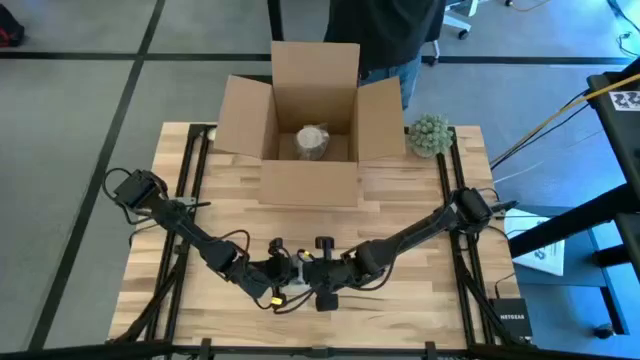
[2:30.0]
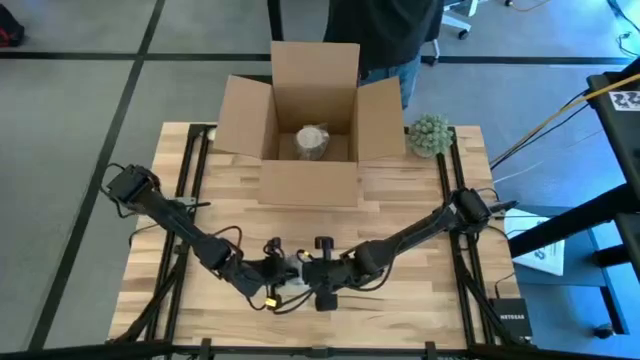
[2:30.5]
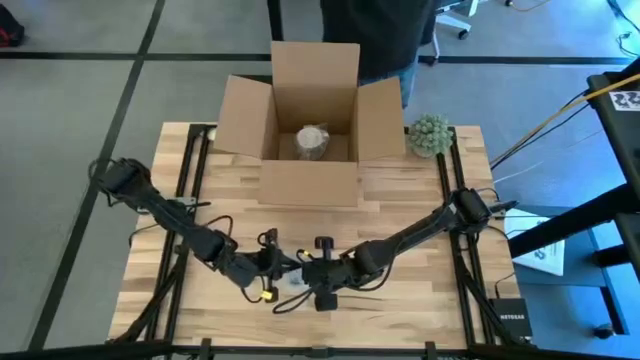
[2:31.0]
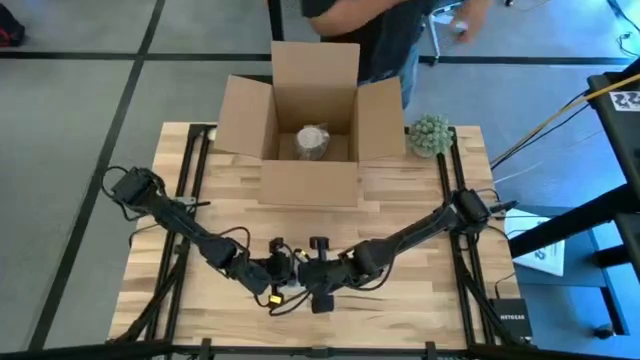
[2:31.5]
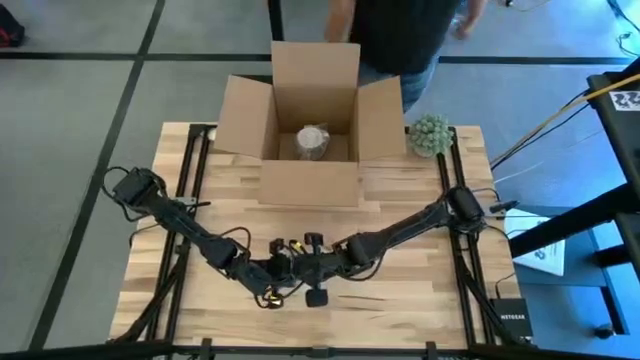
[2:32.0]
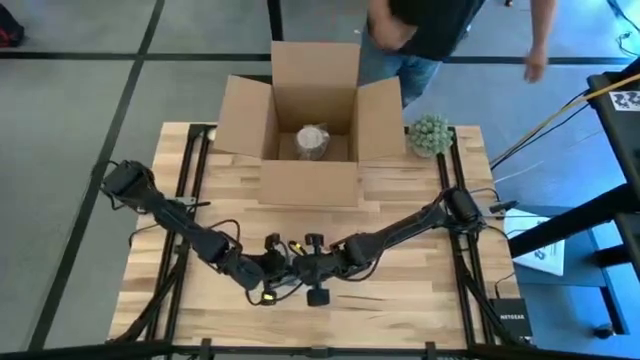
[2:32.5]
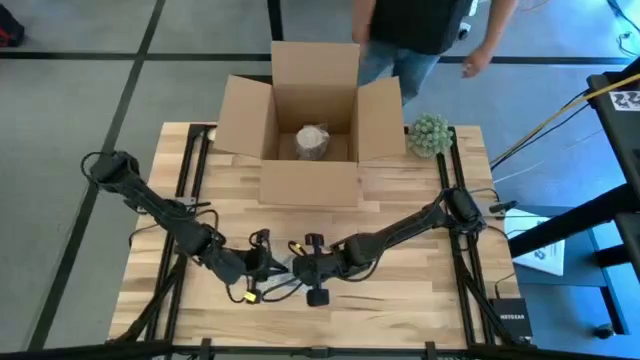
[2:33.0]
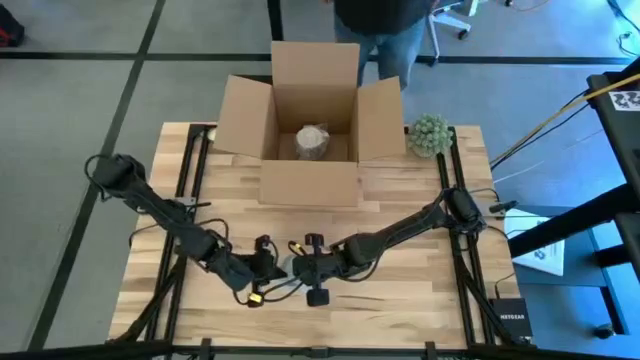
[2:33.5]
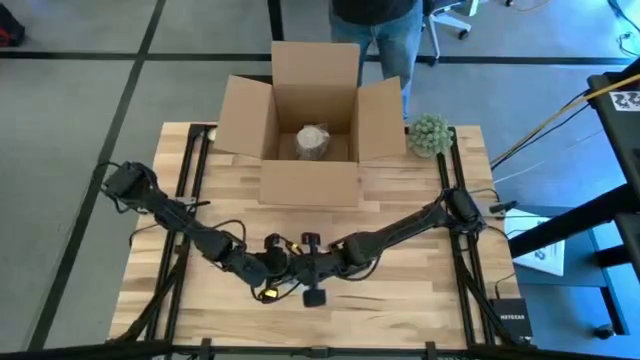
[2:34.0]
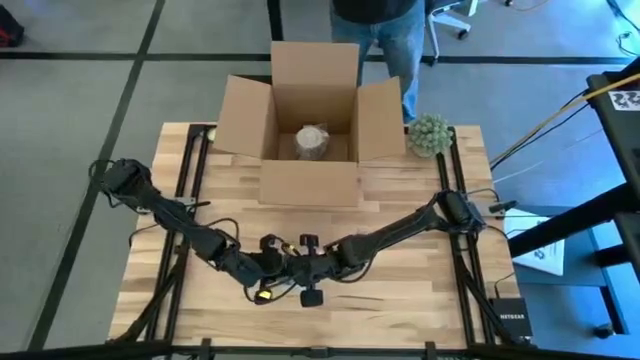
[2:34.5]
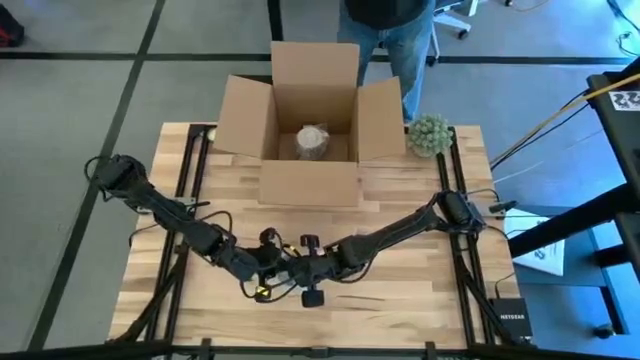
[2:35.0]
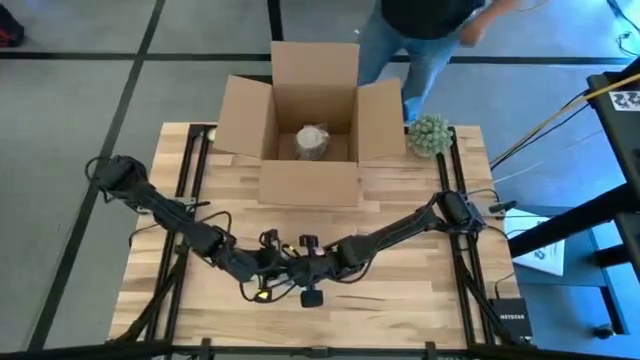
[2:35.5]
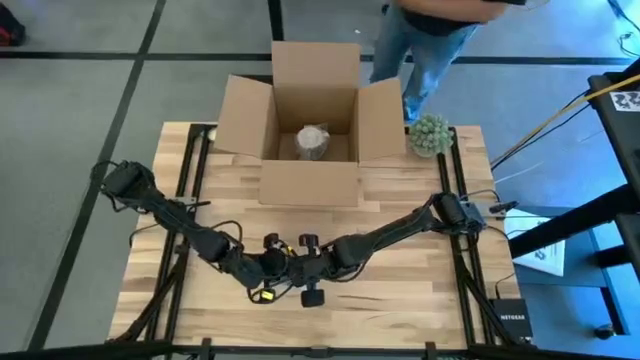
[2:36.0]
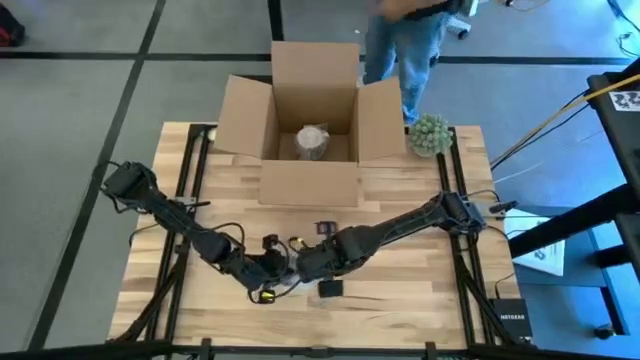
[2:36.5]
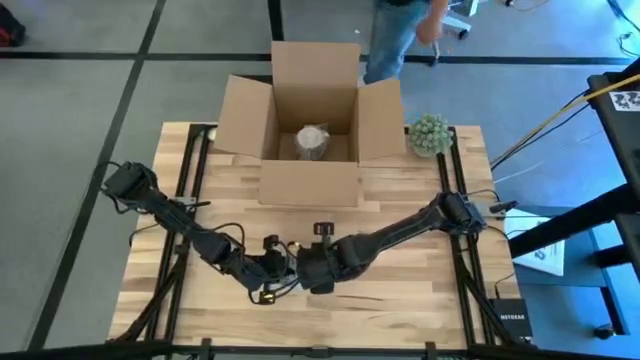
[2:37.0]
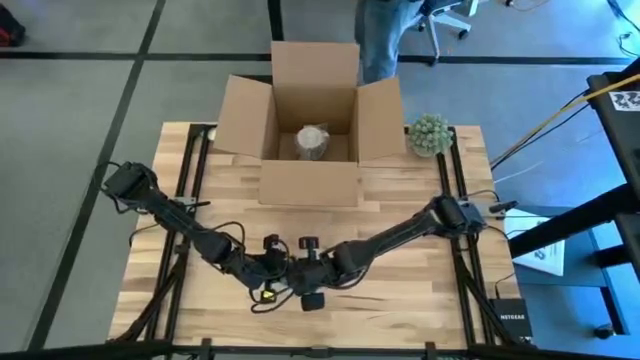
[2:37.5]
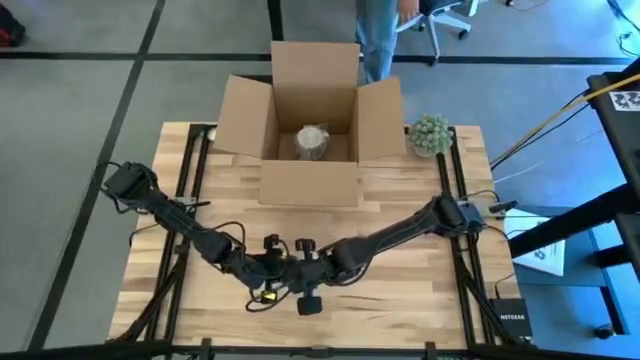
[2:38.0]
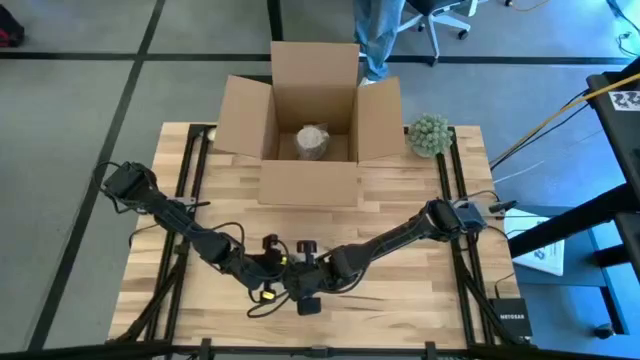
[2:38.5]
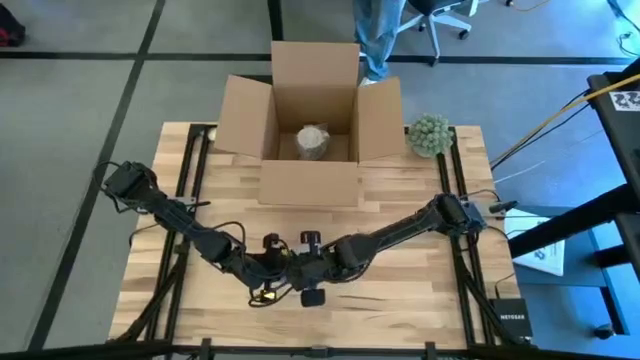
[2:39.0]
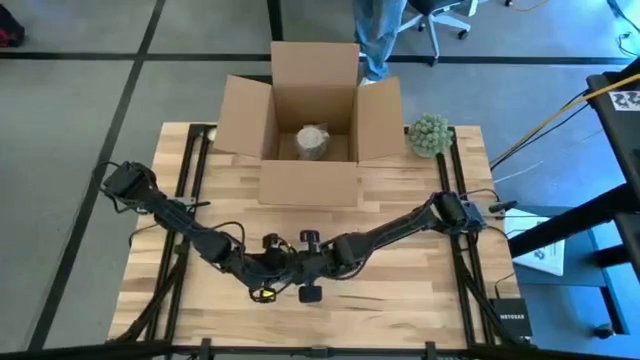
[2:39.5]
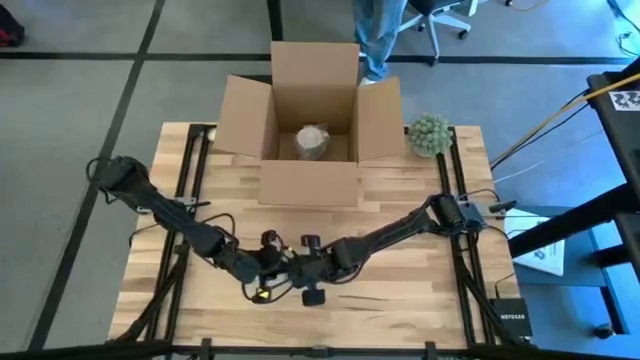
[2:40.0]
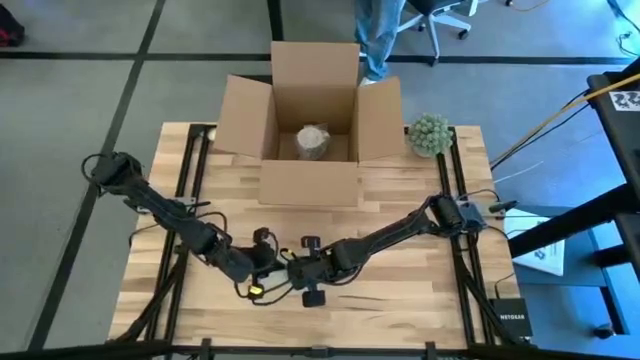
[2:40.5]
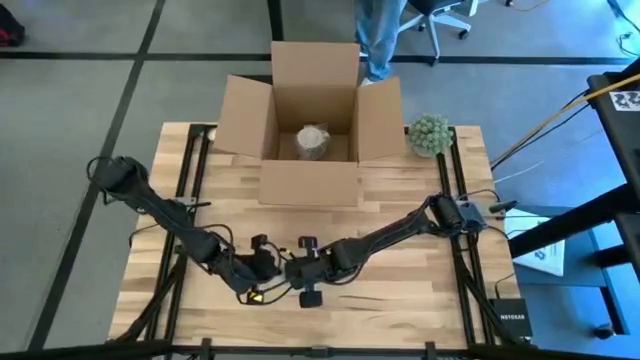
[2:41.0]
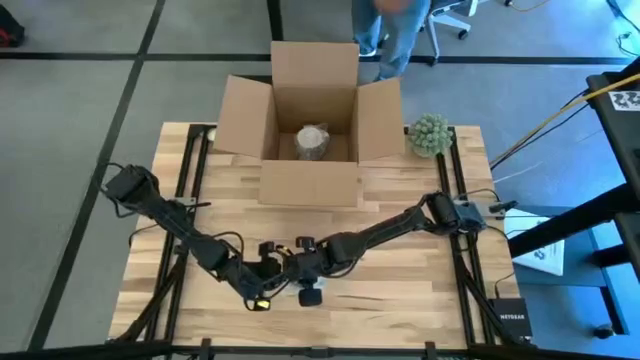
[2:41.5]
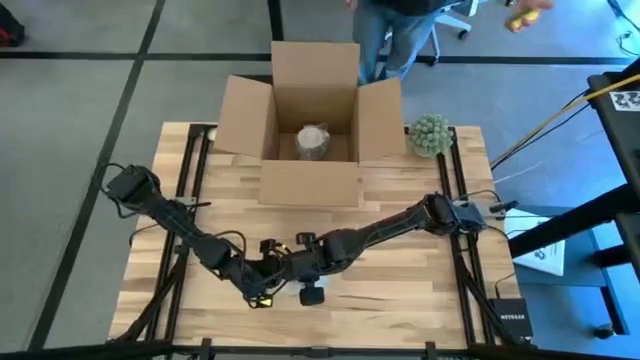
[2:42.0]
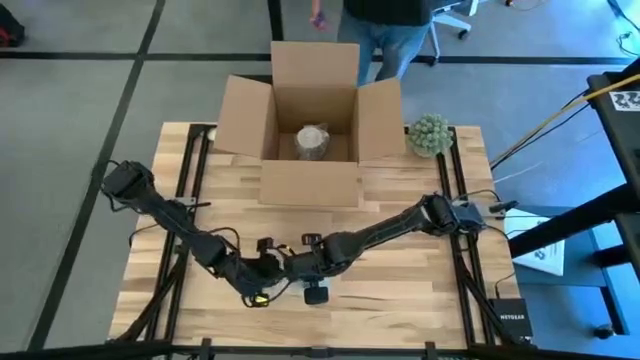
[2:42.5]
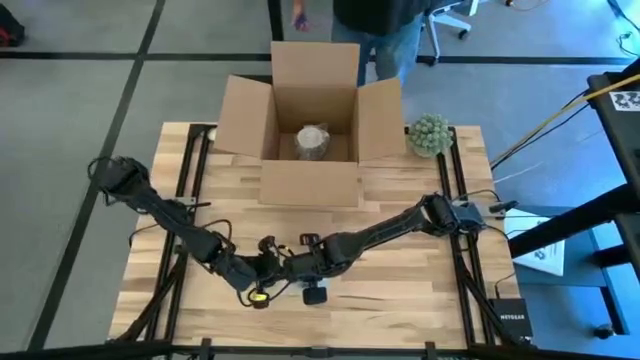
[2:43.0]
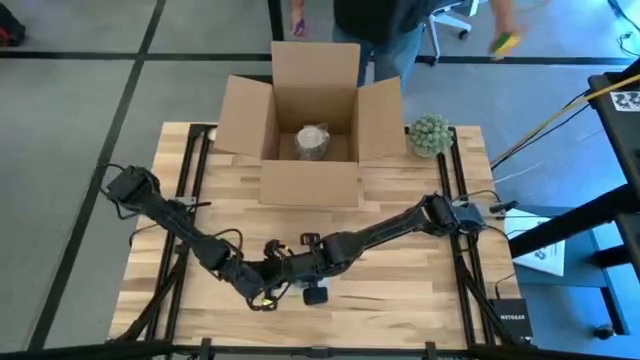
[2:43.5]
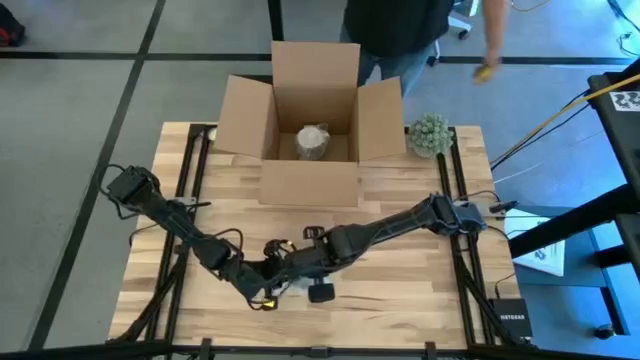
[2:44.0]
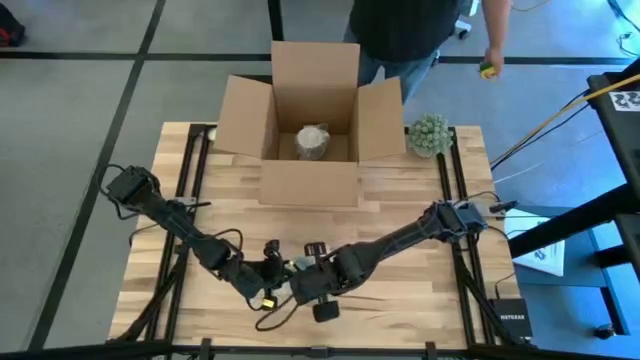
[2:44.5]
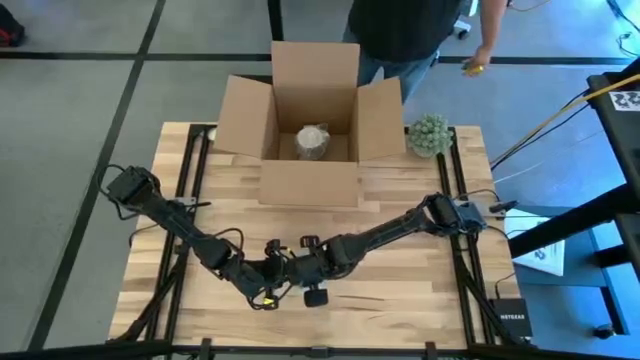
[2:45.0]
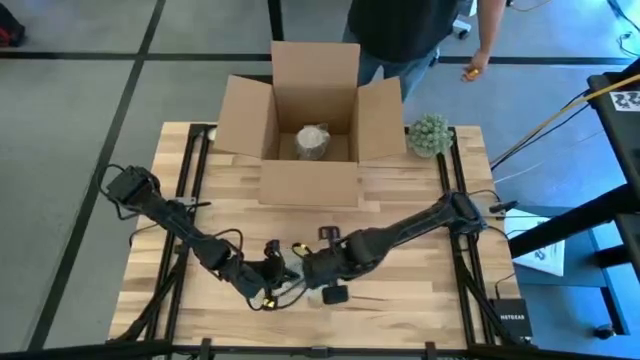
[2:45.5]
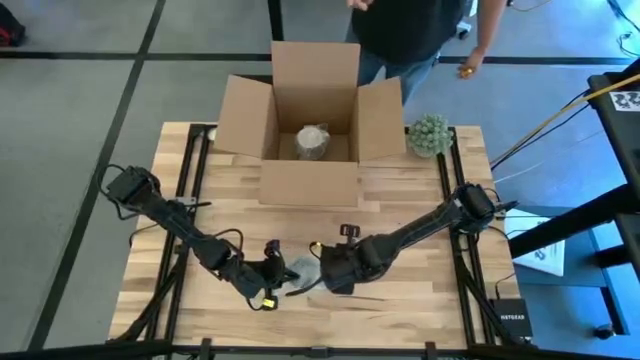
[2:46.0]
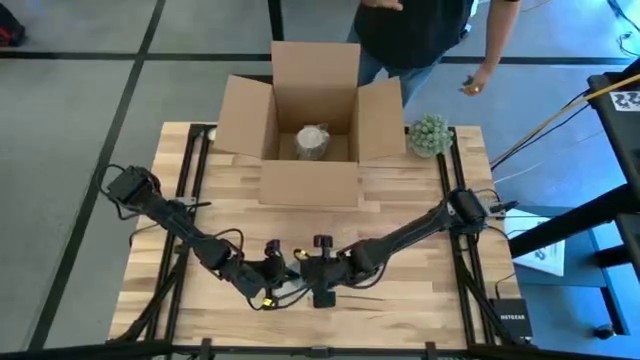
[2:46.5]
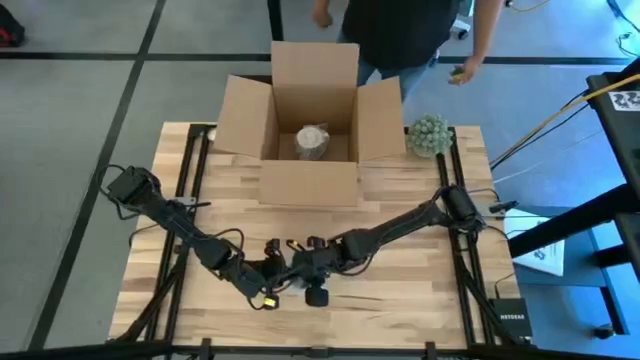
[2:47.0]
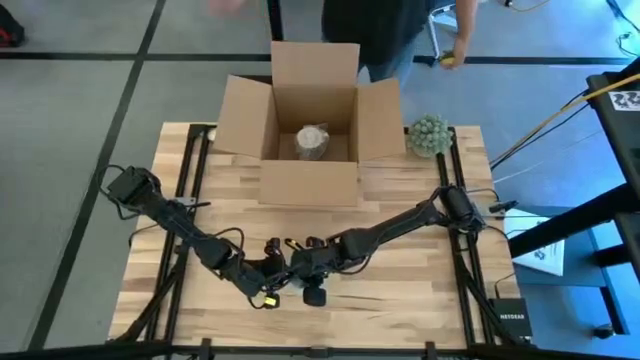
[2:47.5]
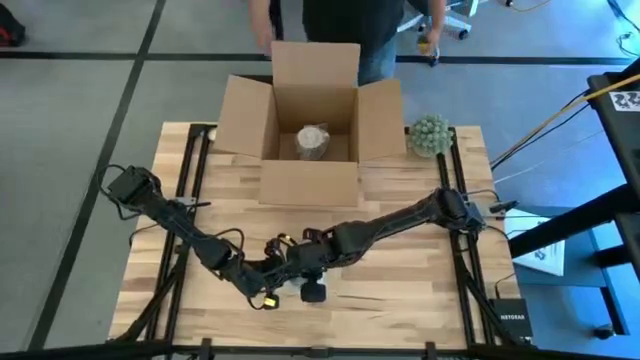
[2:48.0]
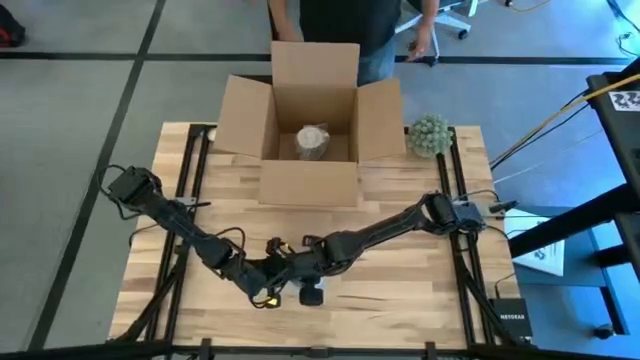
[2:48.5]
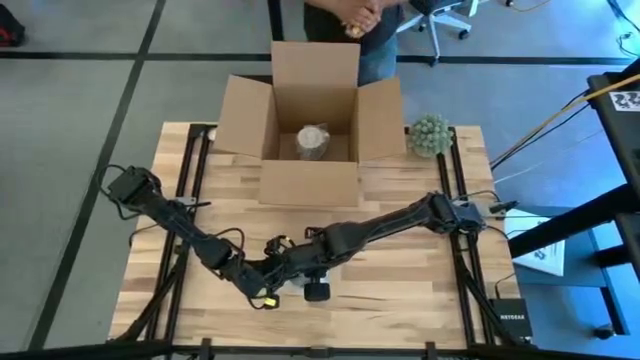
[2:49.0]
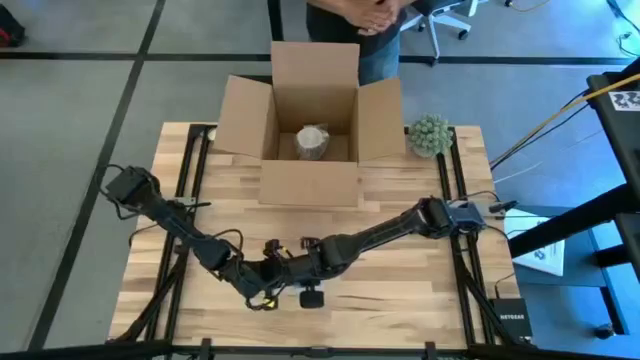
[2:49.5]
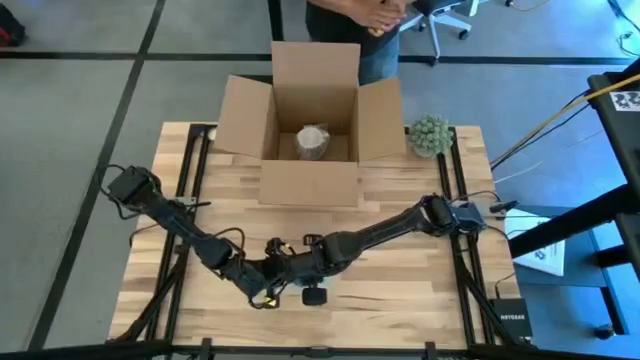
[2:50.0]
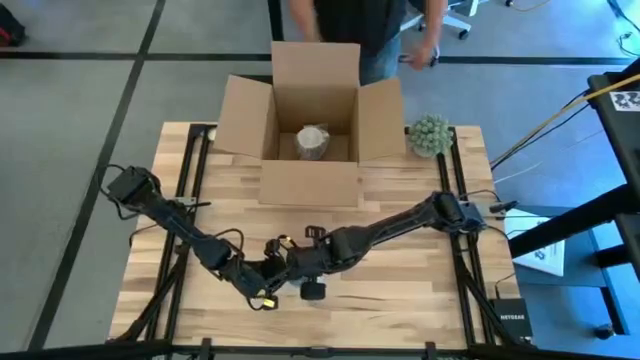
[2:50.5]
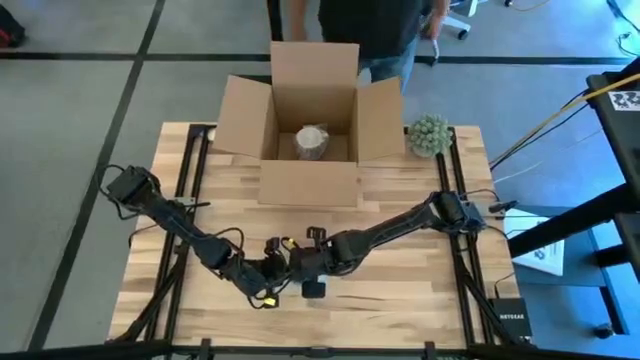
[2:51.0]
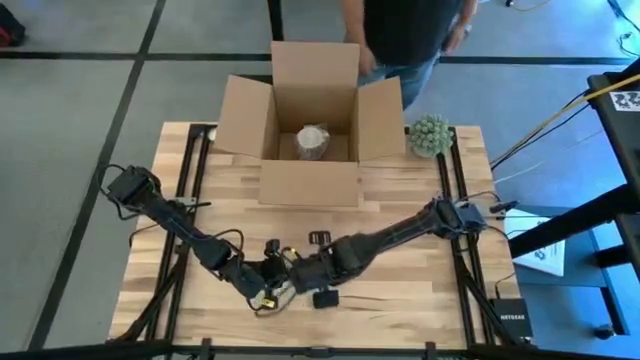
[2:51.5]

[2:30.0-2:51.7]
Task: wrap mug
Wrap the dark green mug using the transparent bubble wrap
